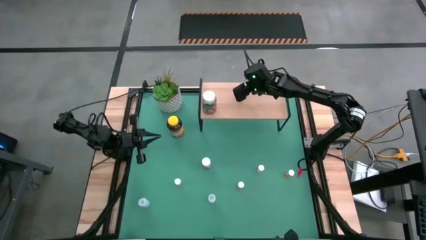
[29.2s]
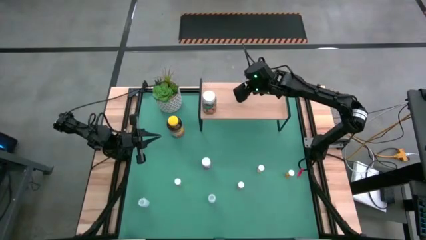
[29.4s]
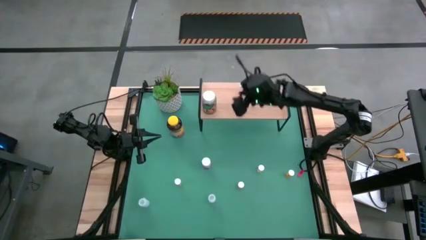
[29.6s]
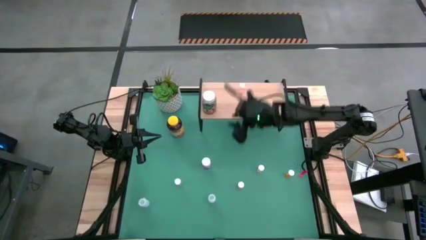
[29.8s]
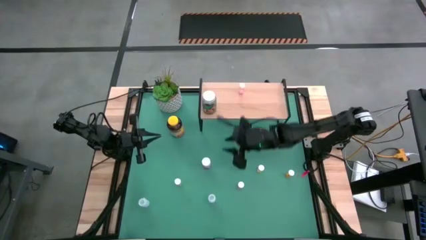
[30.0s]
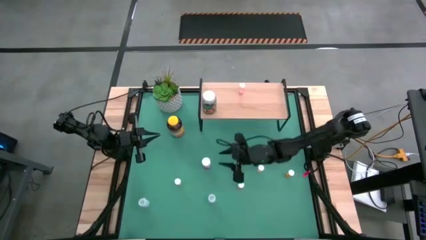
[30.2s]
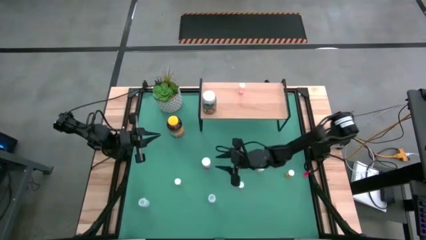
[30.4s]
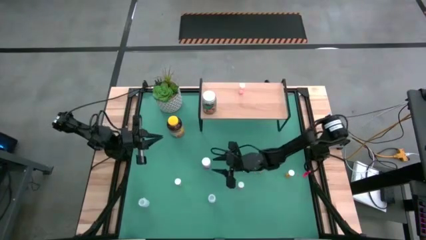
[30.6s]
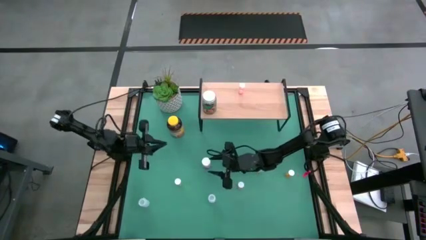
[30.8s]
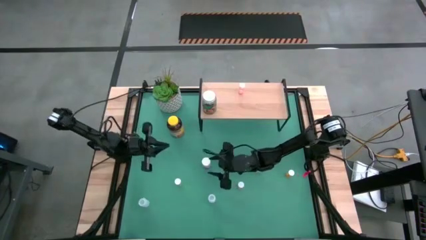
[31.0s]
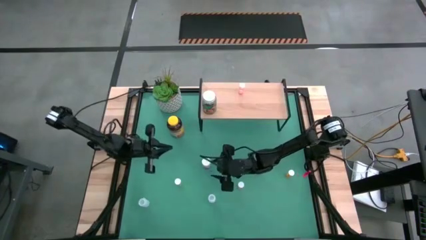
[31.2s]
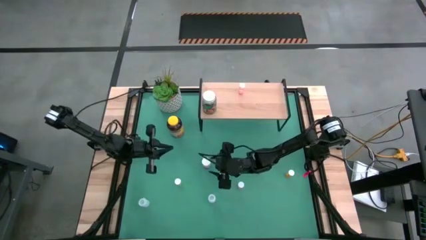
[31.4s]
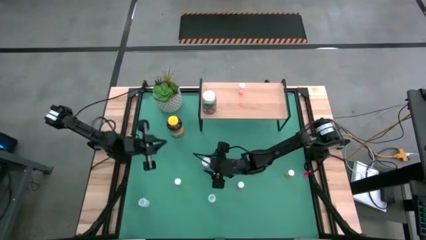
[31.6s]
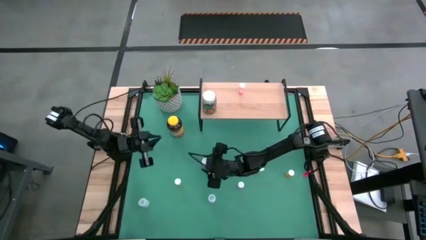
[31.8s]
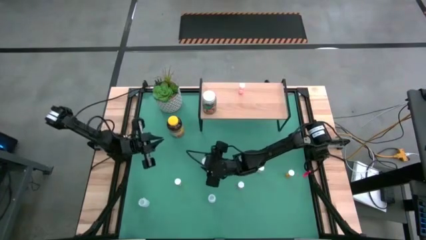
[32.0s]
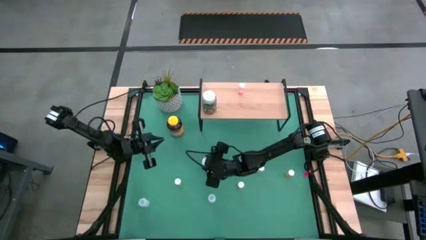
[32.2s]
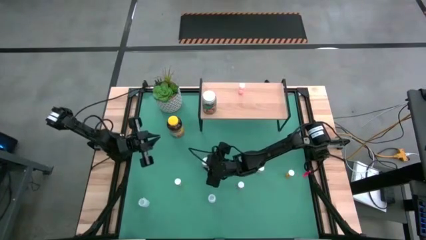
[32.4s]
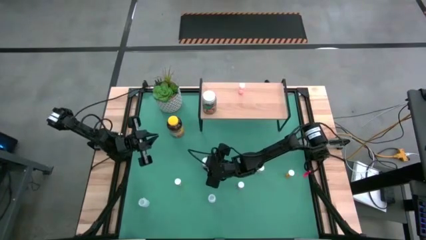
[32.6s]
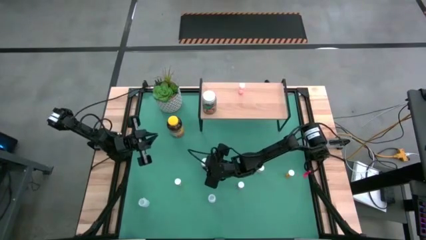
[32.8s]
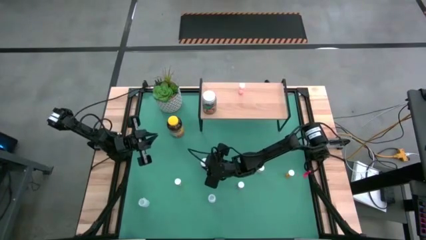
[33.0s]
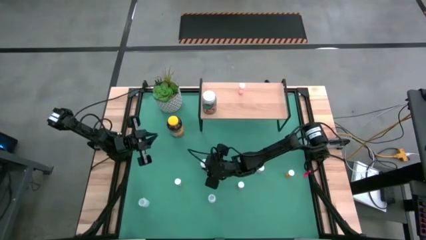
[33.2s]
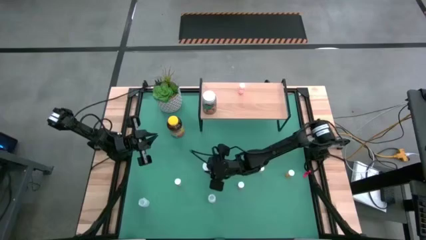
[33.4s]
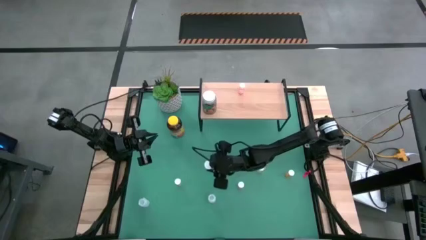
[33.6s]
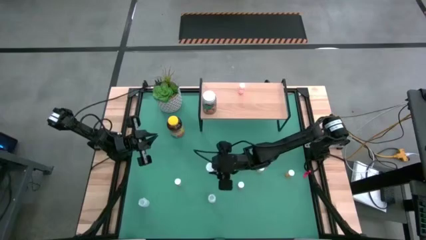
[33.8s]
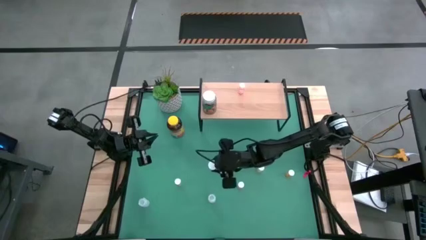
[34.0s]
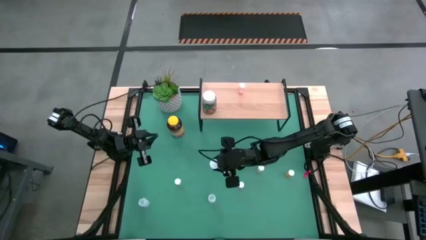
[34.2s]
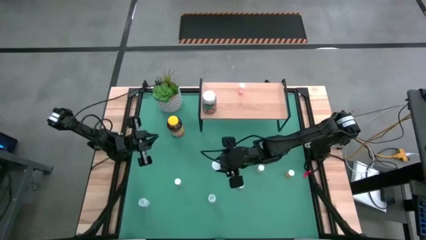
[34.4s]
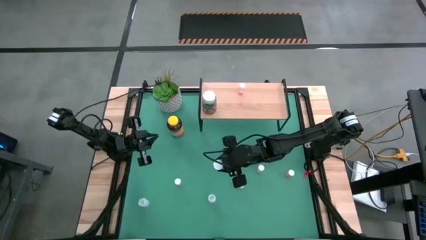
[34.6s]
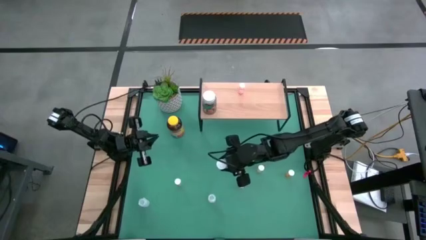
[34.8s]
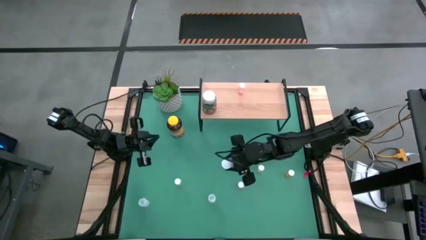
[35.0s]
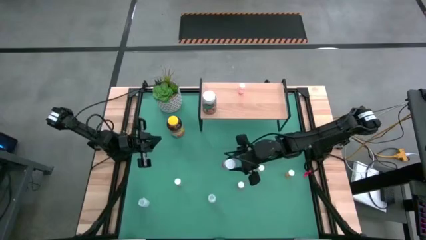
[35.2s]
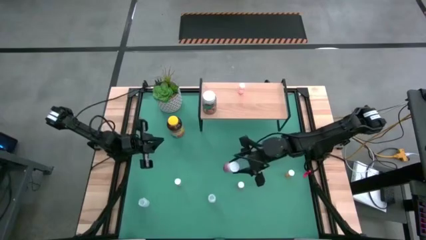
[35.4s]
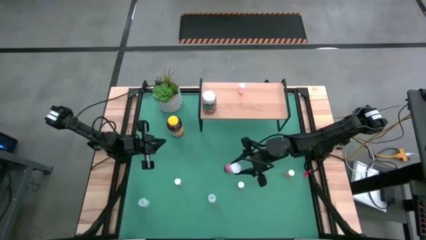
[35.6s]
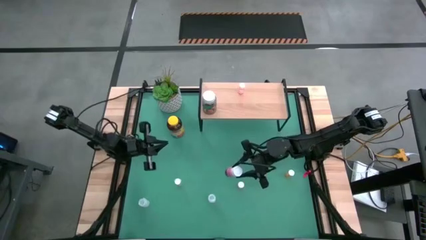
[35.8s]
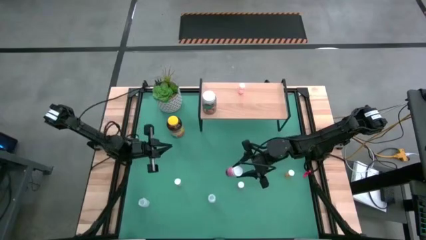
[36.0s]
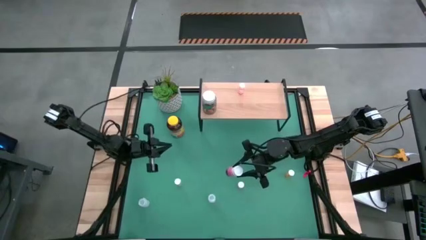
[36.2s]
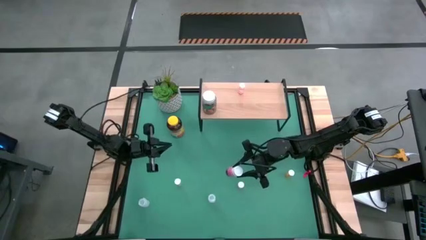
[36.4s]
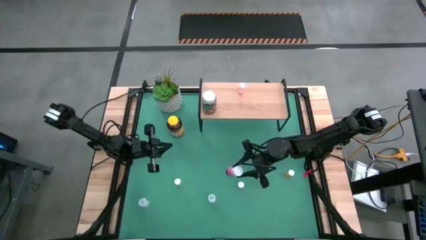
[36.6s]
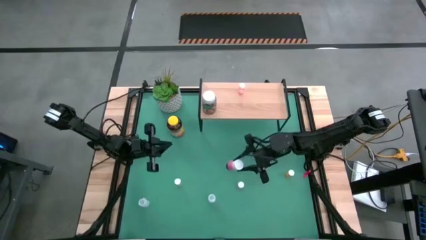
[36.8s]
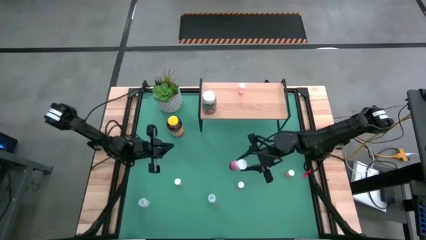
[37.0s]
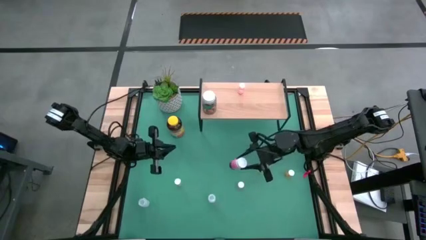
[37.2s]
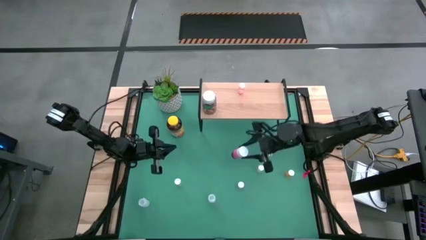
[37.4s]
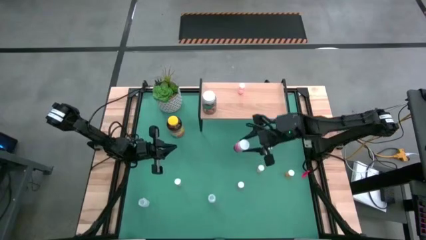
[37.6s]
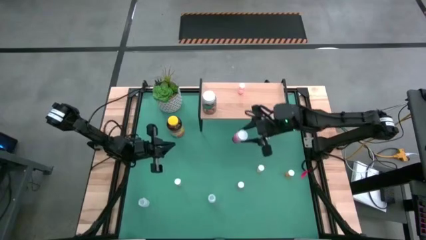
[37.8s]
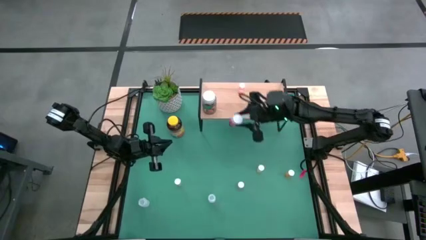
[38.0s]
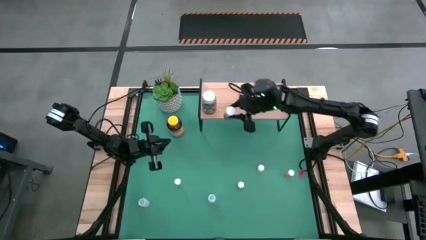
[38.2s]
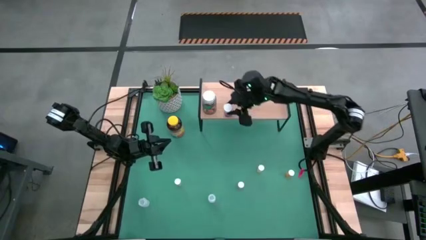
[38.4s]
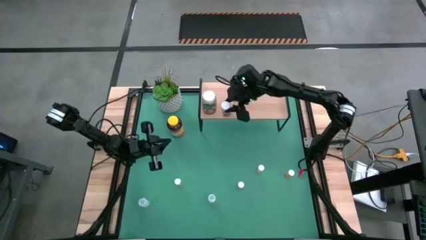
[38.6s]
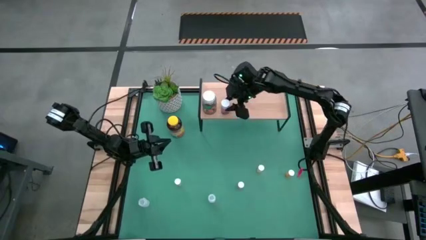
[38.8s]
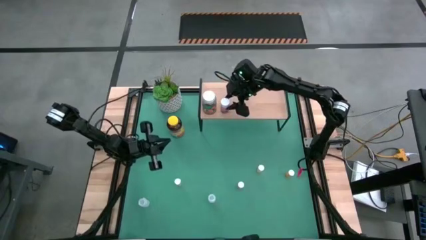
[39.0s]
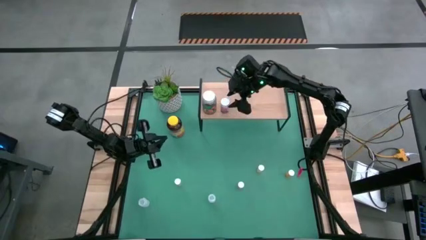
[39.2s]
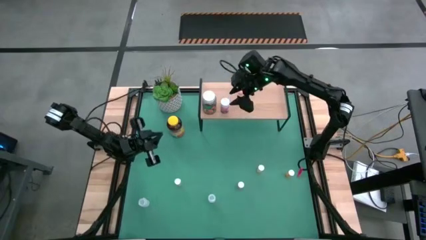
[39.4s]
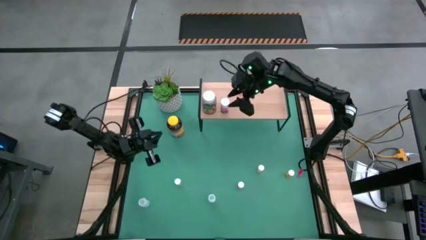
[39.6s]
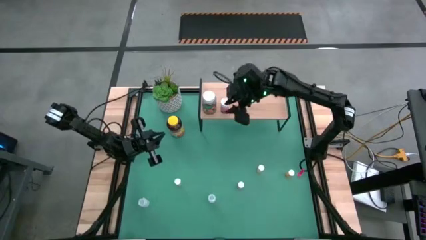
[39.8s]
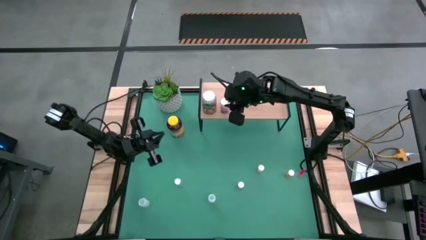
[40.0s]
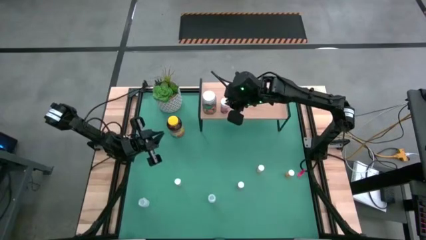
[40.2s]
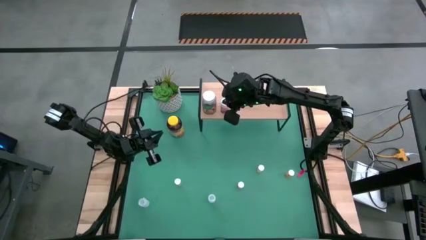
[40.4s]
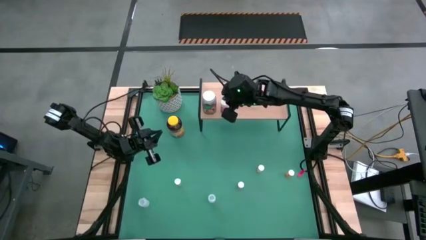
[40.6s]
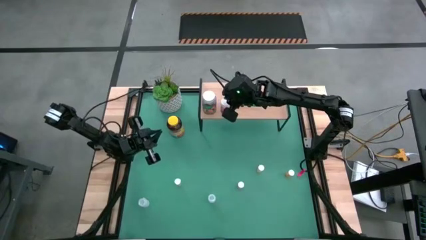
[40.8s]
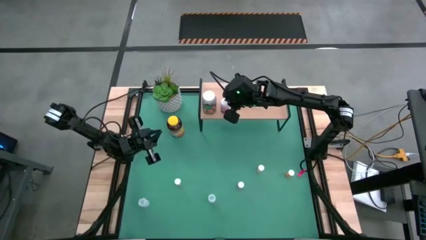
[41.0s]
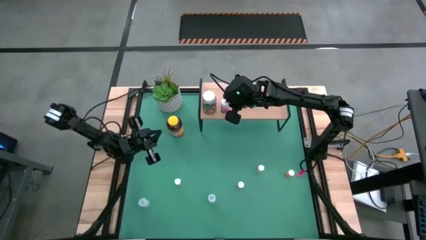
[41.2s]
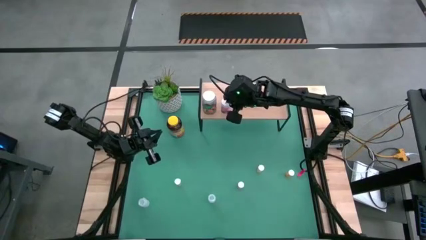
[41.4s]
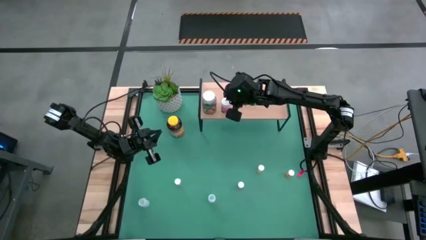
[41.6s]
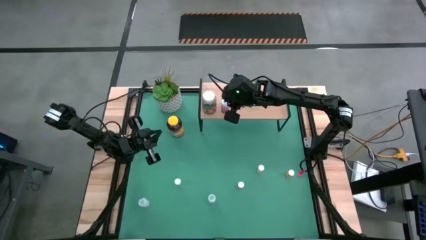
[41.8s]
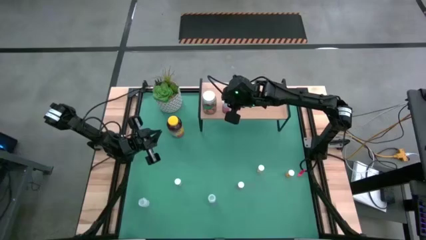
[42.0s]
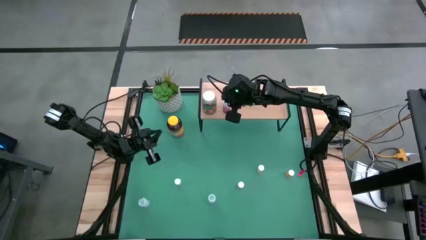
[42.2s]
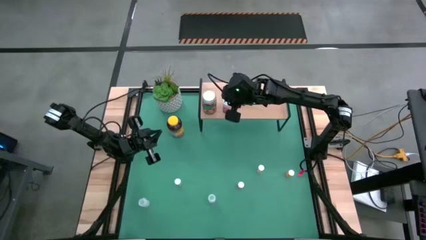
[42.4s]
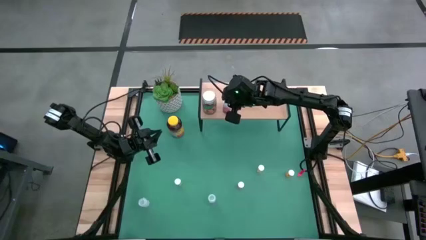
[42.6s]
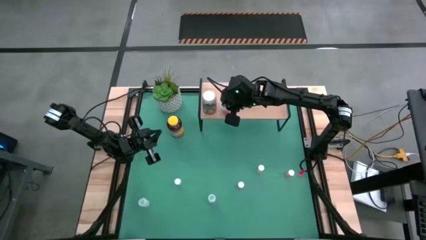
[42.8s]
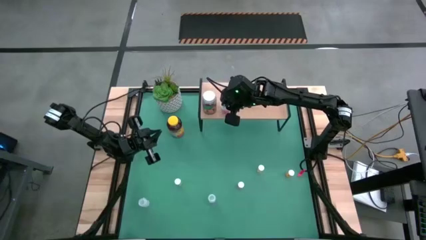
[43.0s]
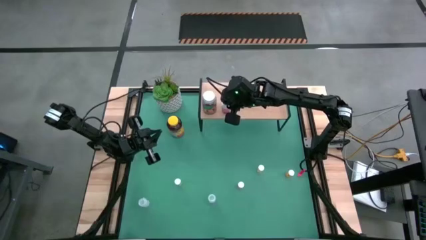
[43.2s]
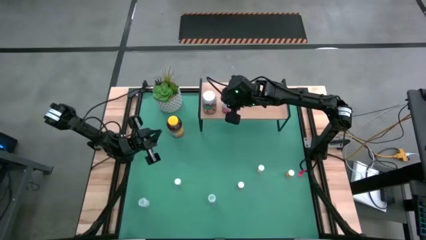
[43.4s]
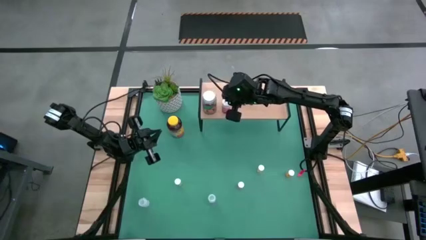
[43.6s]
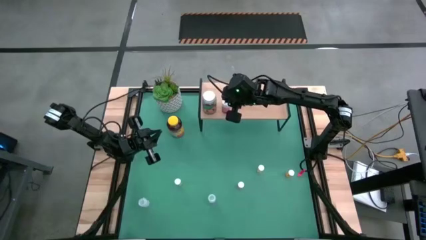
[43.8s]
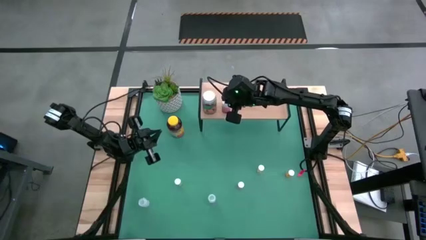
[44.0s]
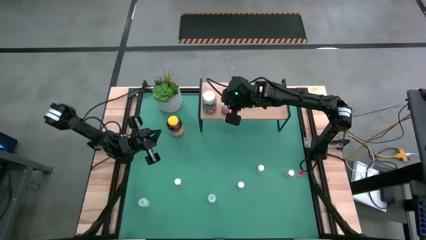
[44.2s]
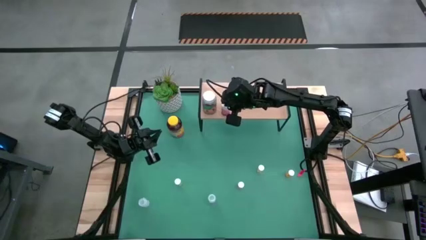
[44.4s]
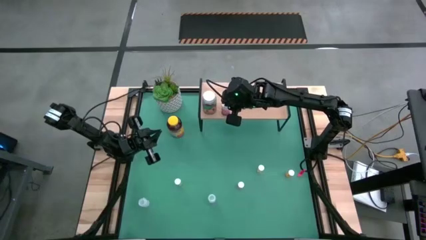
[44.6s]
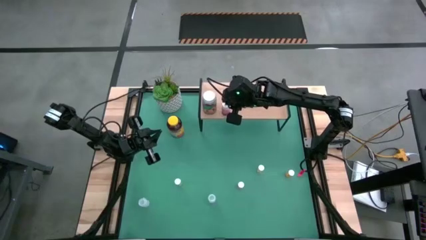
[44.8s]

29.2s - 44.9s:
Task: Pick and place medicine bottles onto shelf by color
Put the large pink medicine bottle on the shelf
